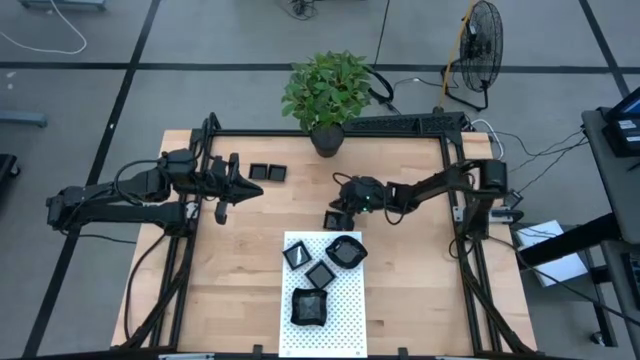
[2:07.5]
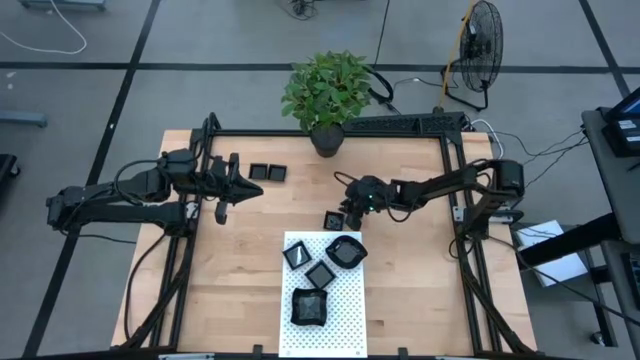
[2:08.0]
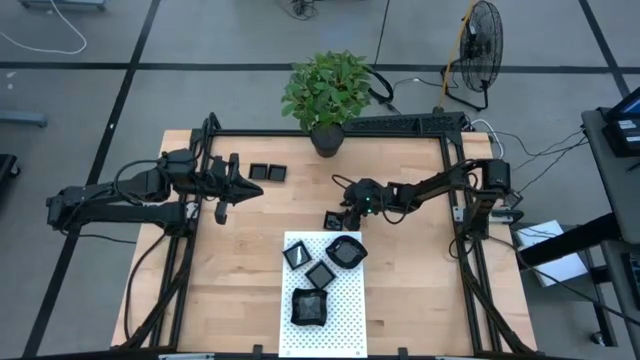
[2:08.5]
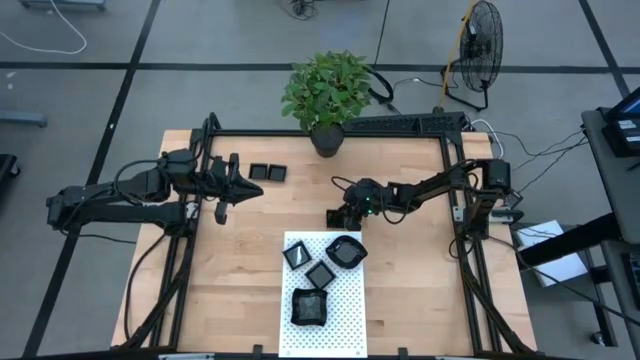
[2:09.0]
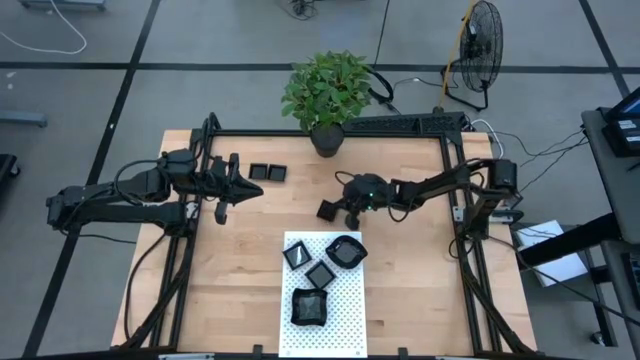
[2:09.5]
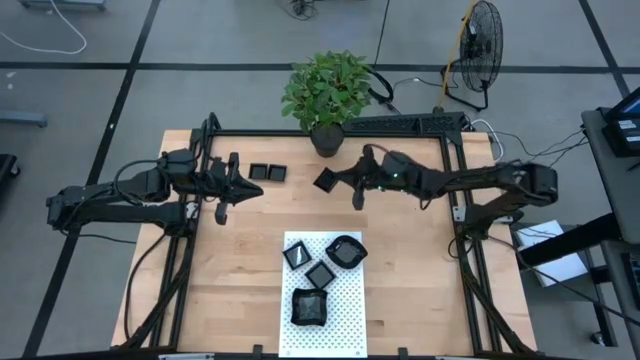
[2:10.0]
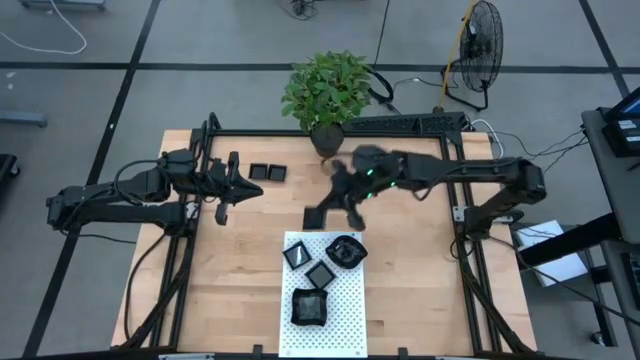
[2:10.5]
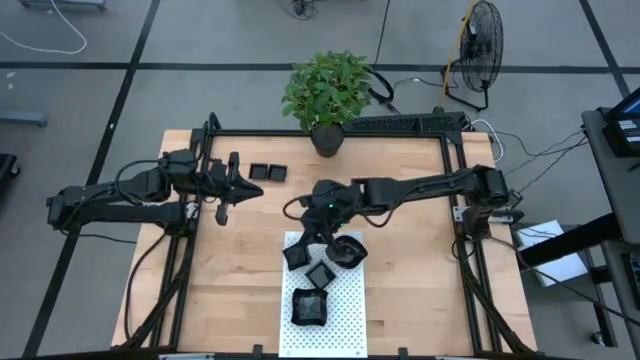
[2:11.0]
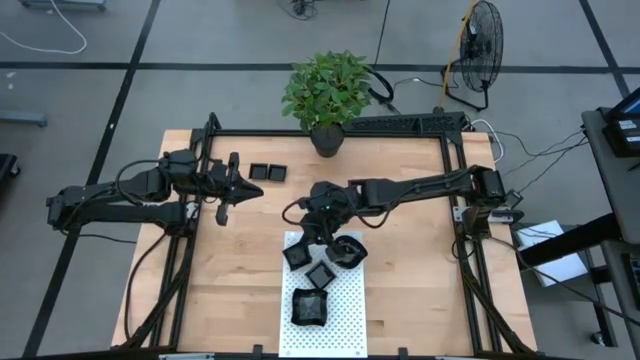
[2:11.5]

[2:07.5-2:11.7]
Task: Pick & Place Mini shaped plates
Stack the bottom square plate on top of the square plate on the shelf

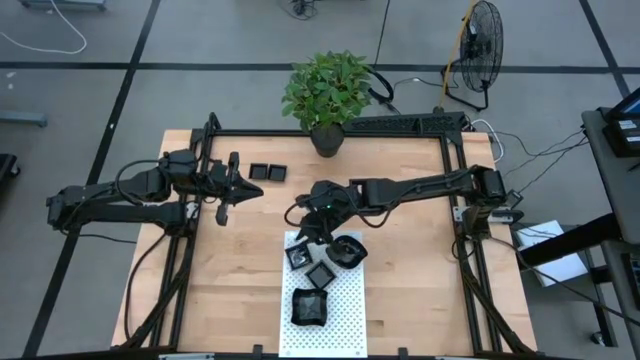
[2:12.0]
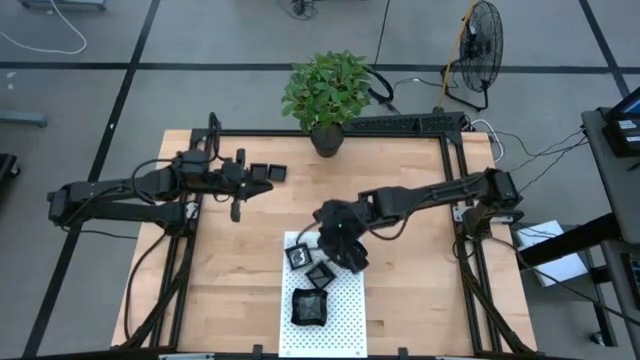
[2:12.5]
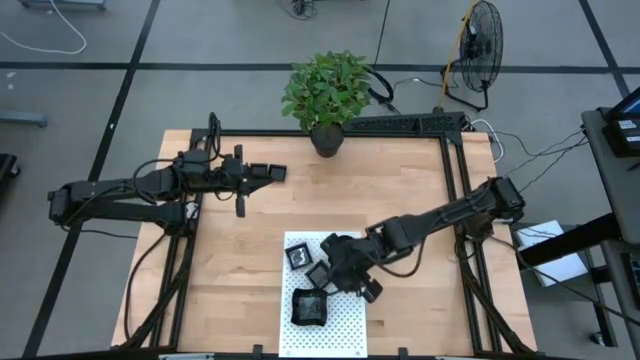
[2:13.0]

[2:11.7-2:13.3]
Stack the black square plate on top of the black square plate on the shelf

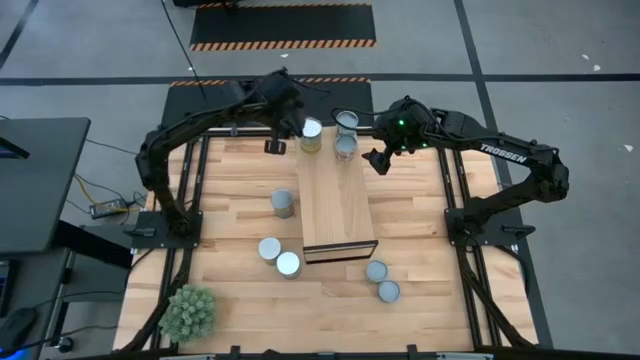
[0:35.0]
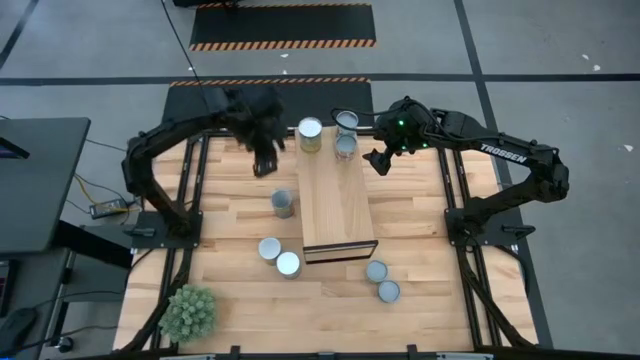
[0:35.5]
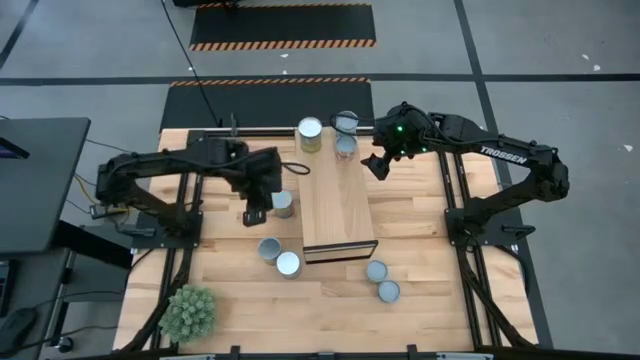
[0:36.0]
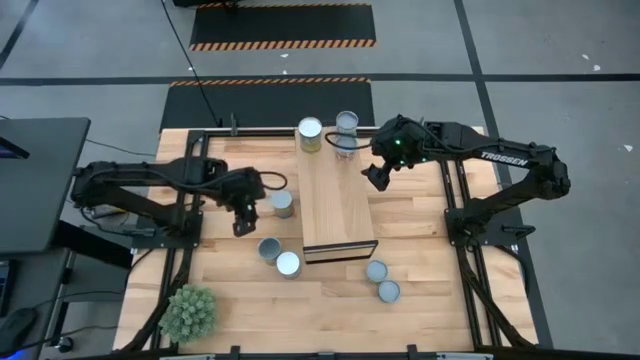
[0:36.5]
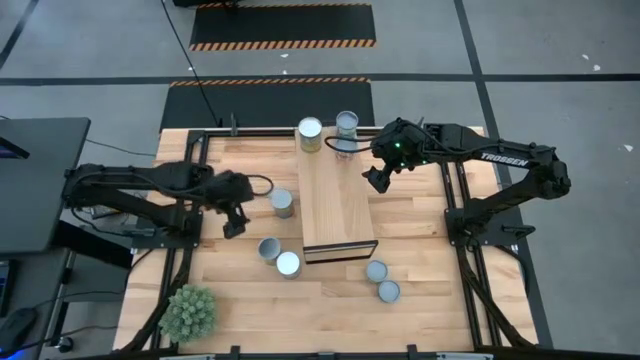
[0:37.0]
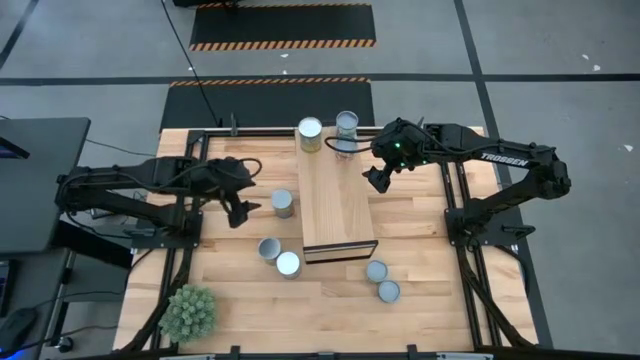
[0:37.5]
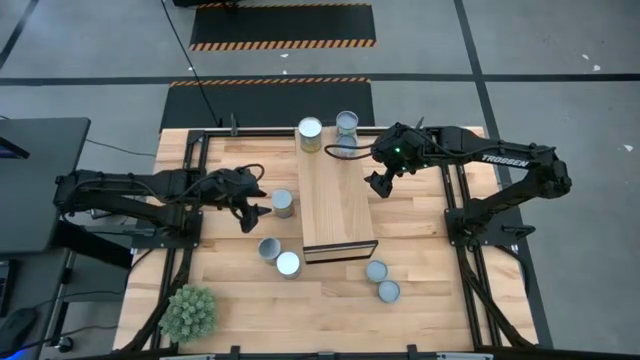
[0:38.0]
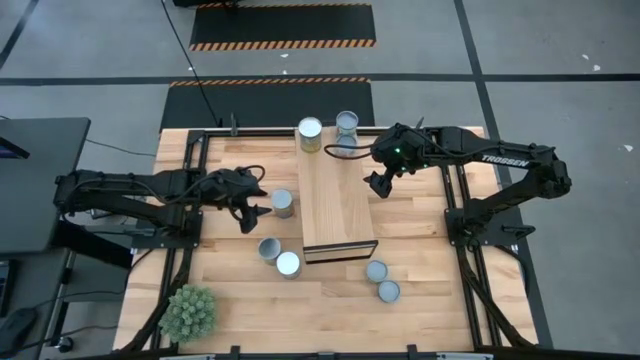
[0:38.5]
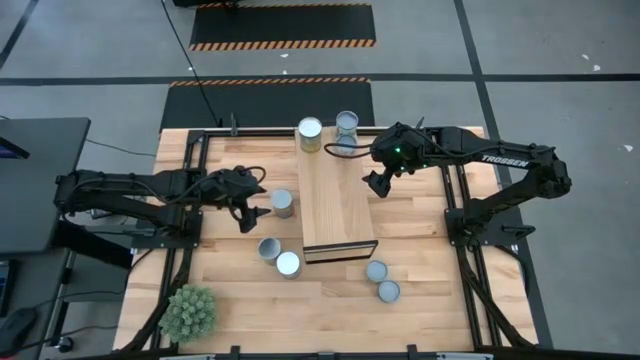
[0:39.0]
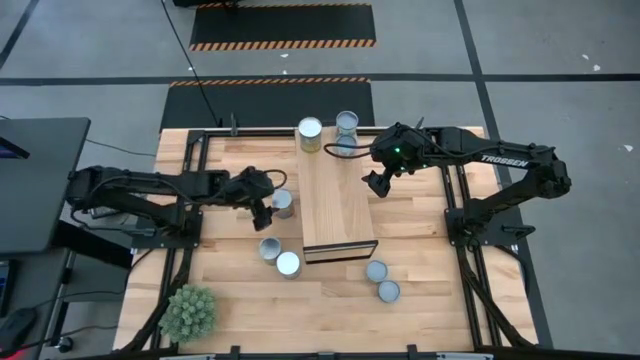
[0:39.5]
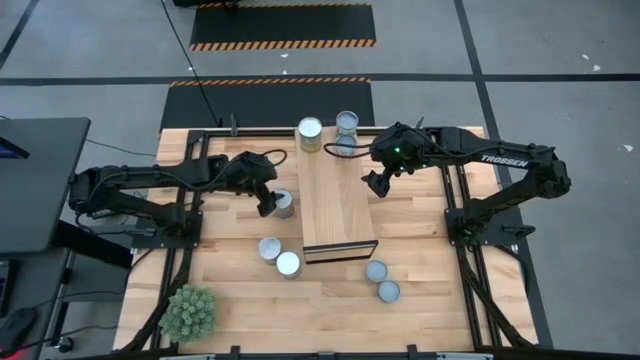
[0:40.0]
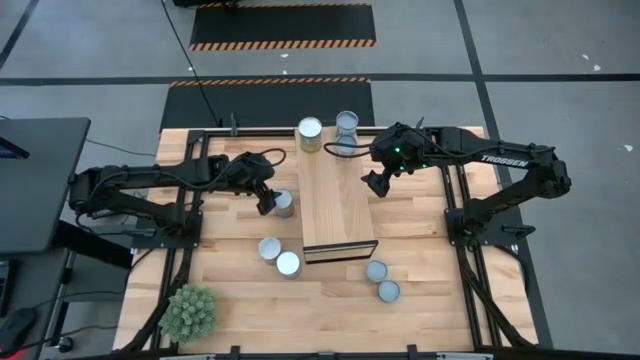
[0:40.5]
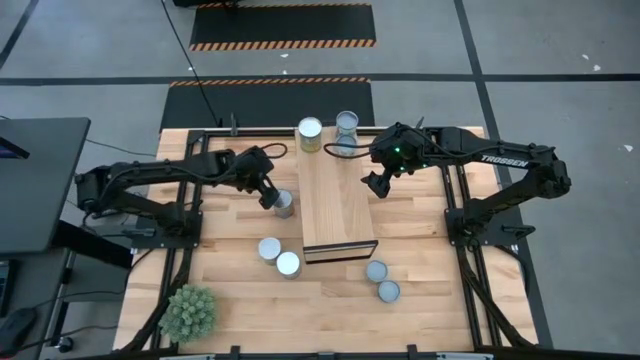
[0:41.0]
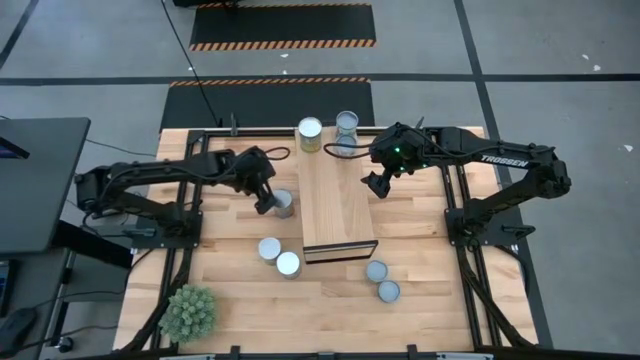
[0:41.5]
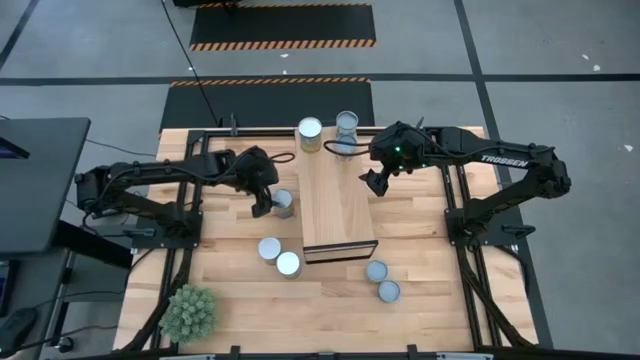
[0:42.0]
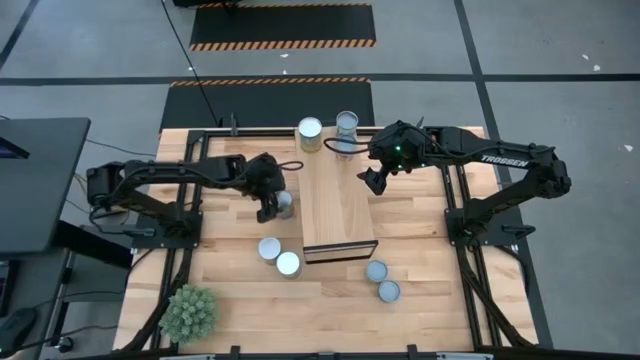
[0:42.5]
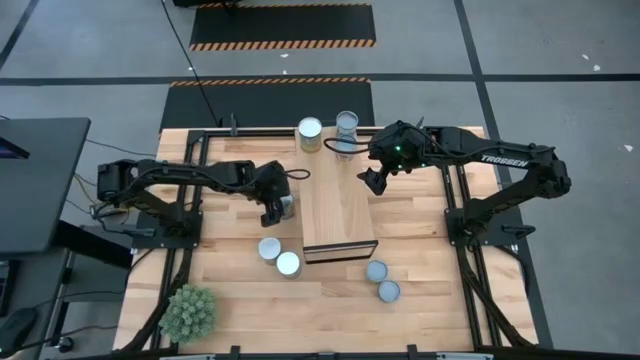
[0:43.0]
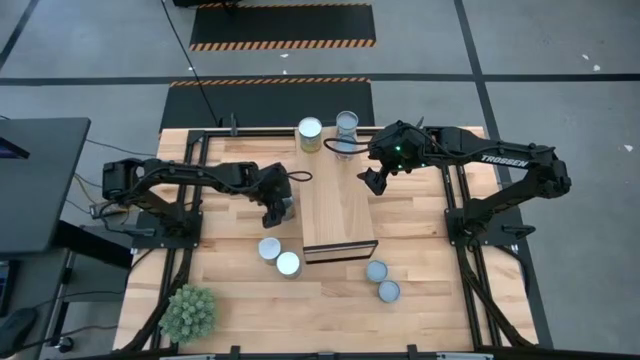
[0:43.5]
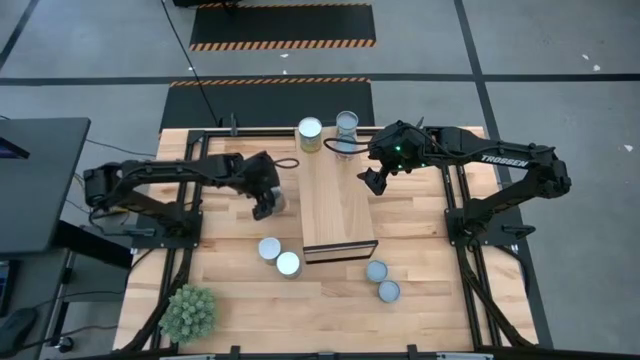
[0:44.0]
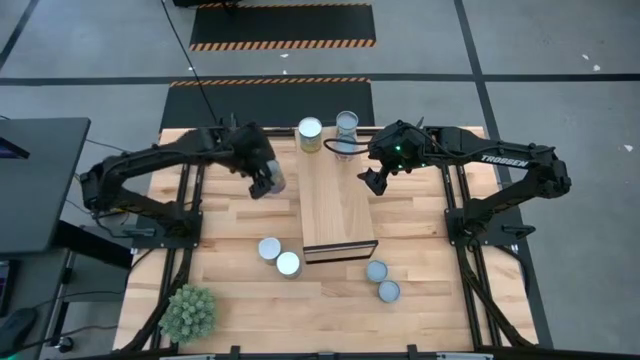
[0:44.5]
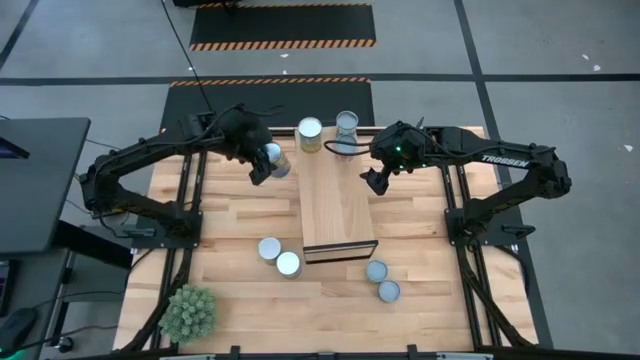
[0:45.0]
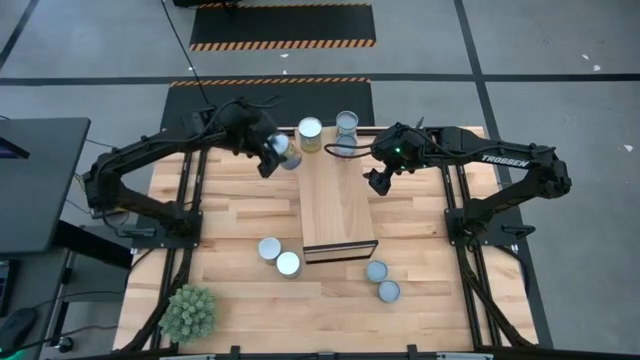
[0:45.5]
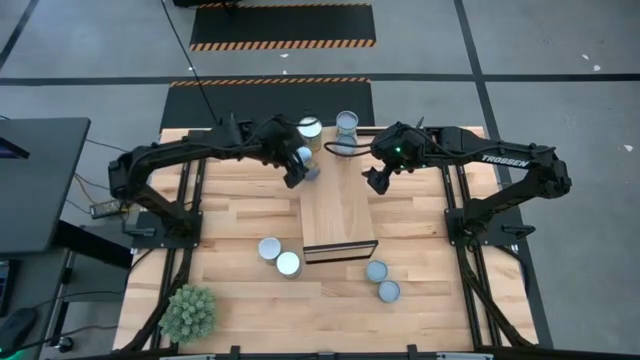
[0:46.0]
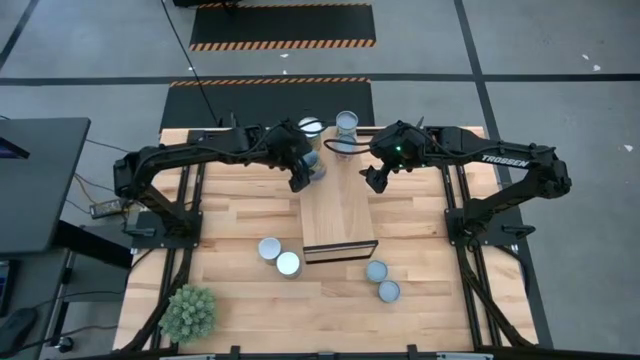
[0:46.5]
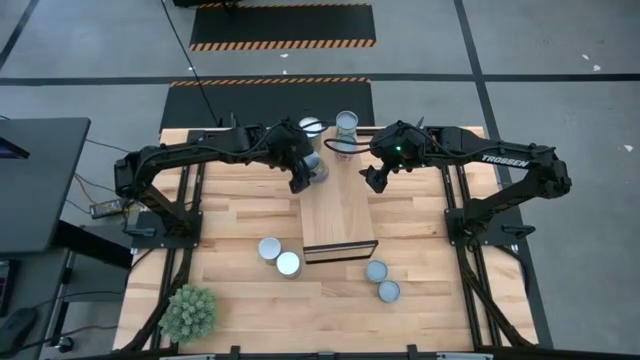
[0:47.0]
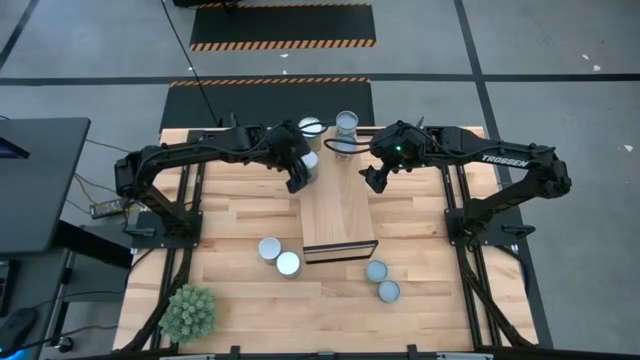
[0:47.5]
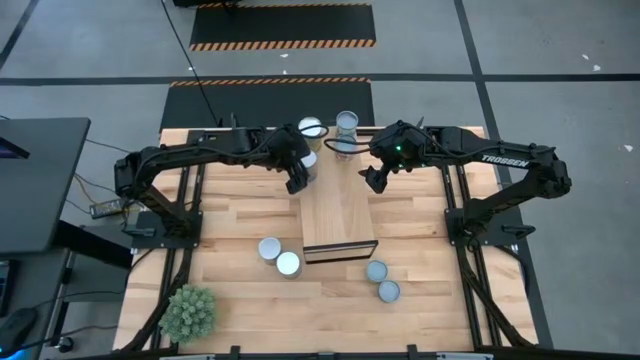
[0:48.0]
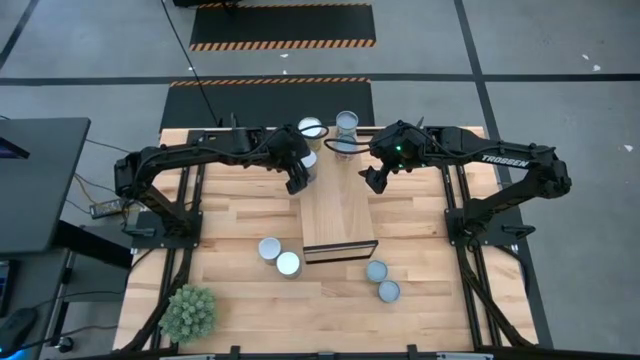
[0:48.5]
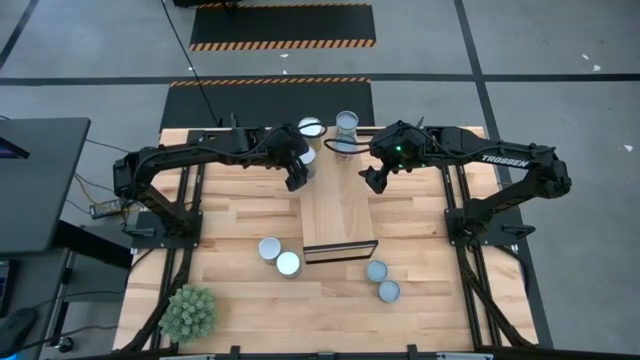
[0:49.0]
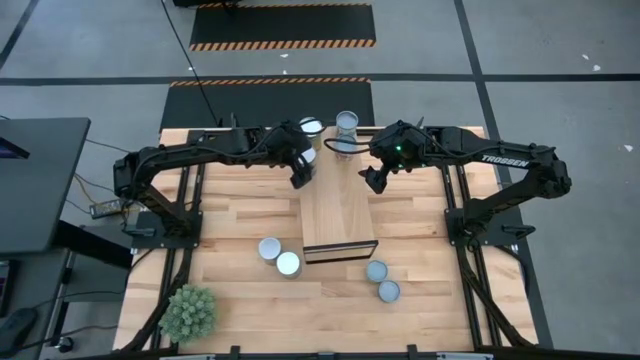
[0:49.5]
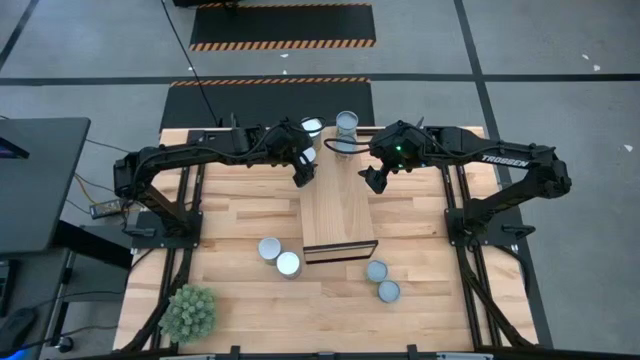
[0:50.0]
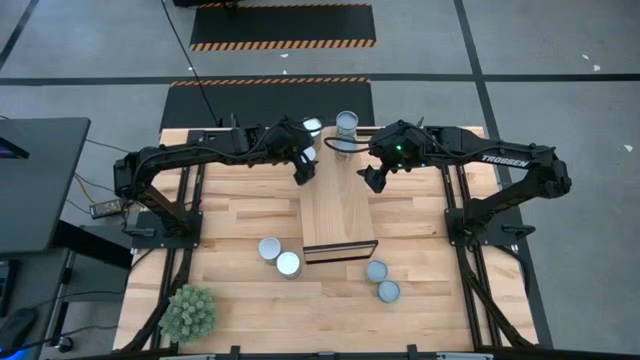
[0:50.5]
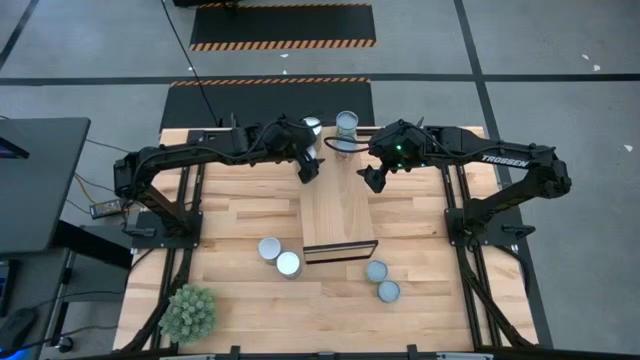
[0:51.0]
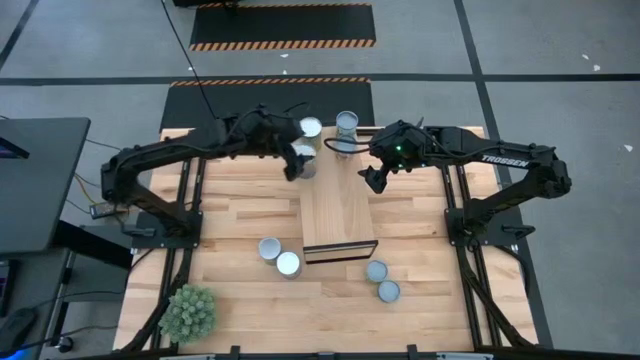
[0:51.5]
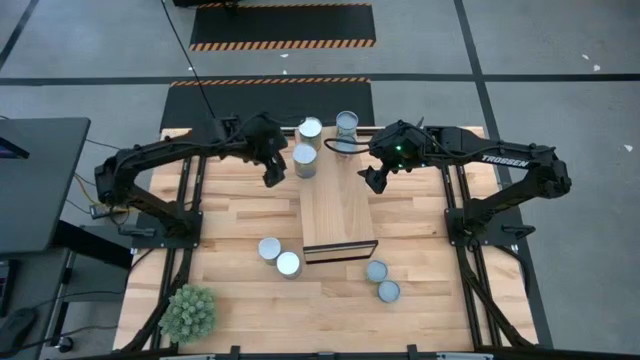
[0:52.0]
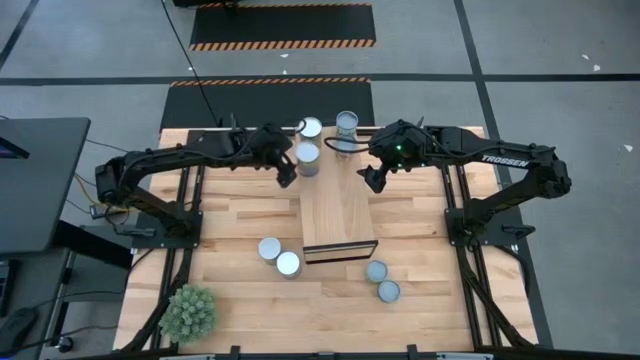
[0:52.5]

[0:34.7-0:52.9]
Task: Pick and place cans onto a shelf
Put the canned peaches on the shelf
